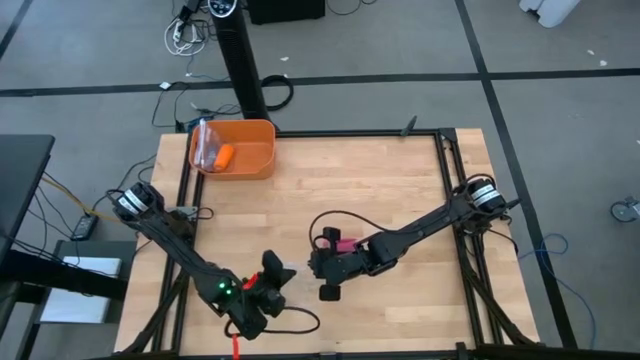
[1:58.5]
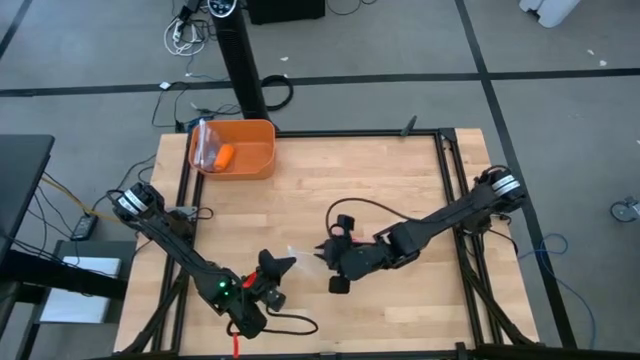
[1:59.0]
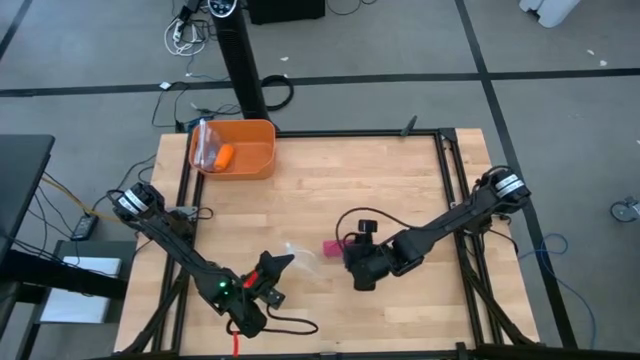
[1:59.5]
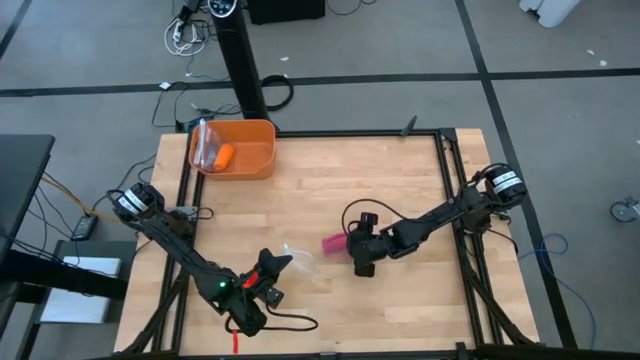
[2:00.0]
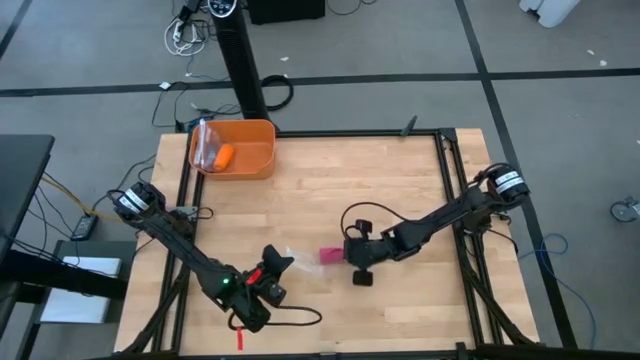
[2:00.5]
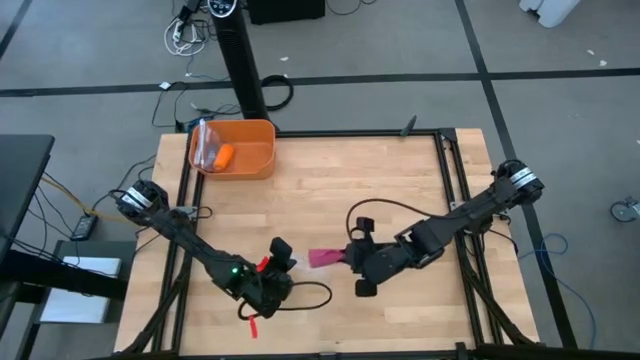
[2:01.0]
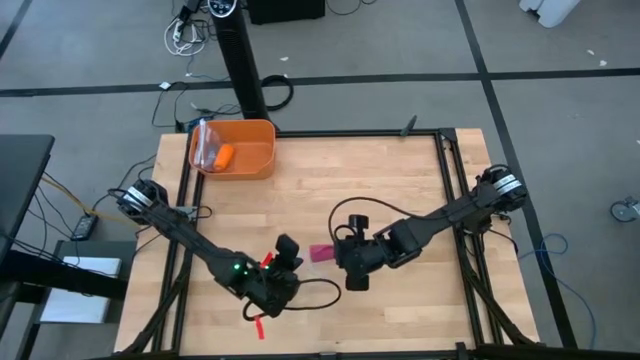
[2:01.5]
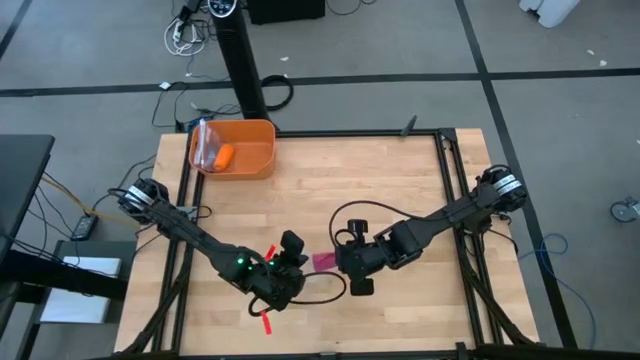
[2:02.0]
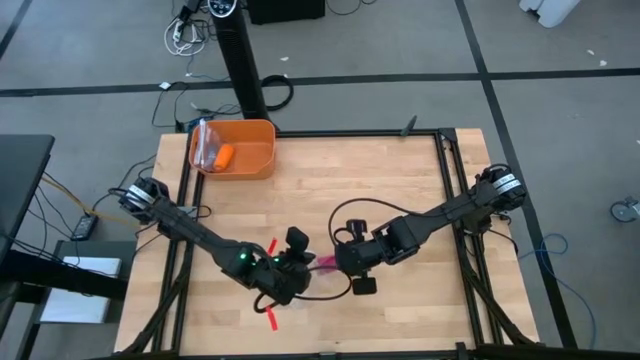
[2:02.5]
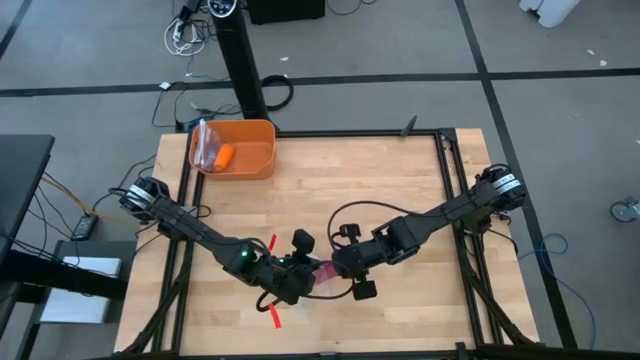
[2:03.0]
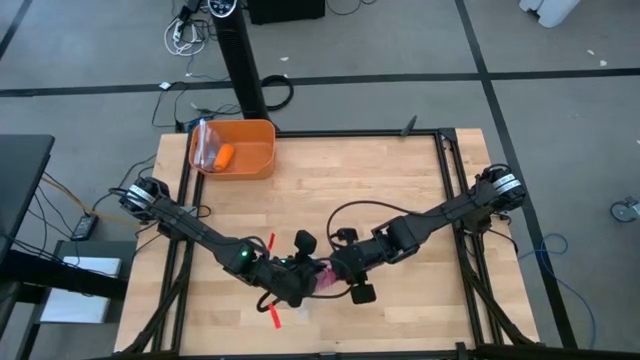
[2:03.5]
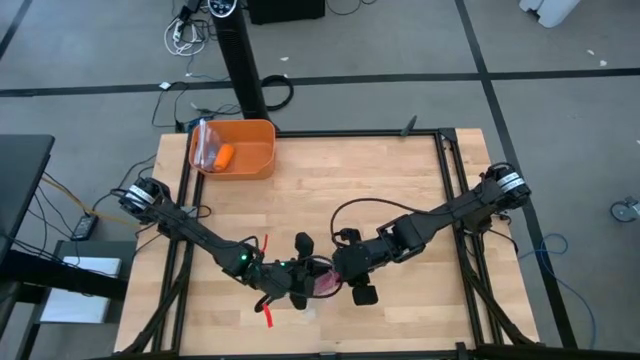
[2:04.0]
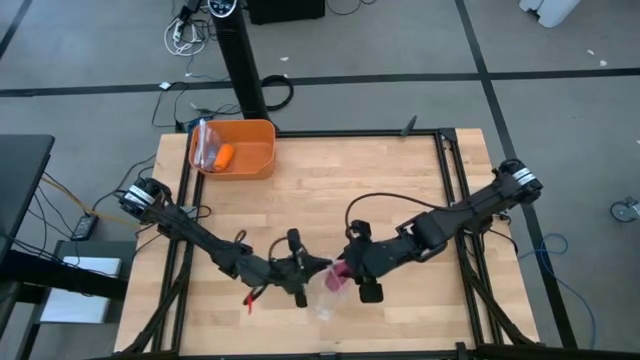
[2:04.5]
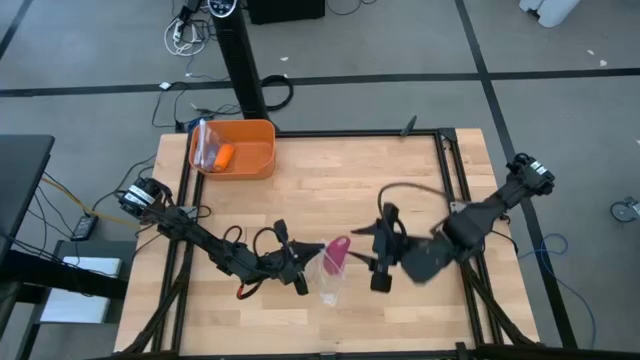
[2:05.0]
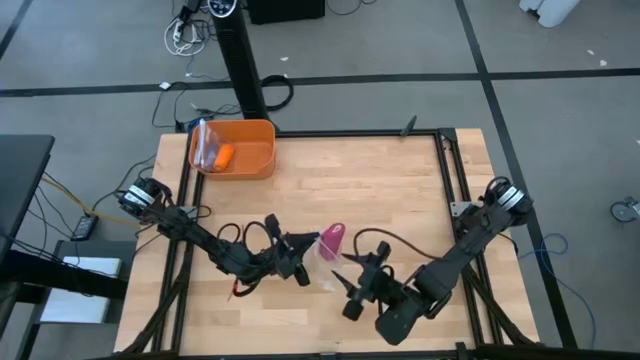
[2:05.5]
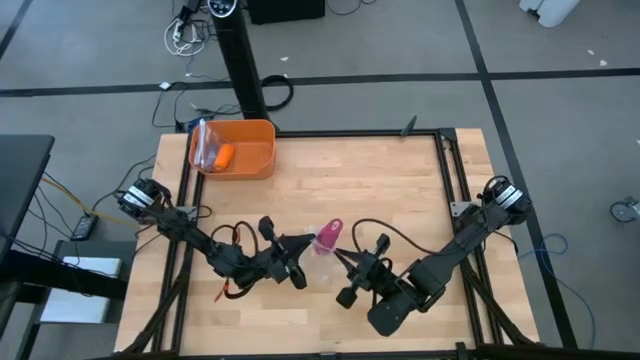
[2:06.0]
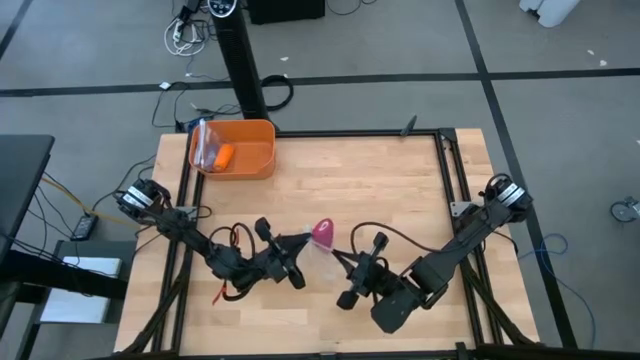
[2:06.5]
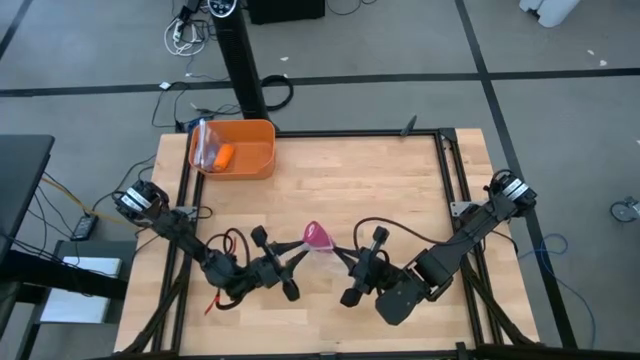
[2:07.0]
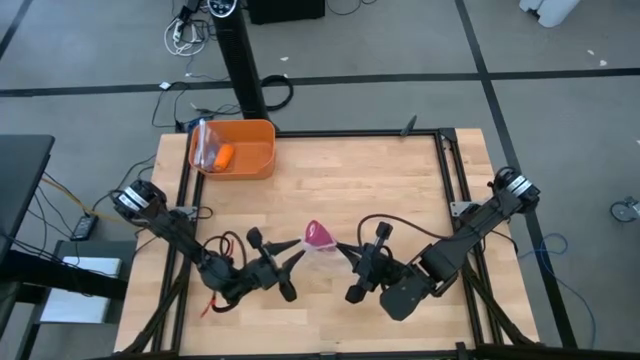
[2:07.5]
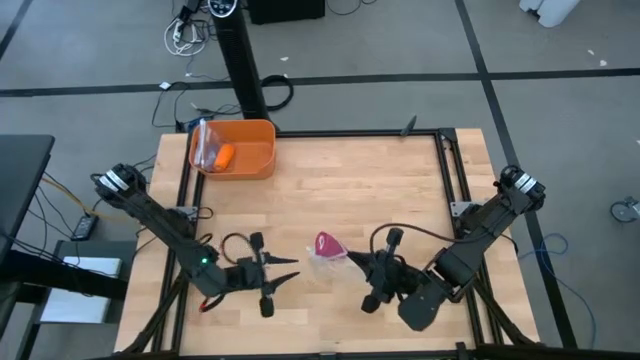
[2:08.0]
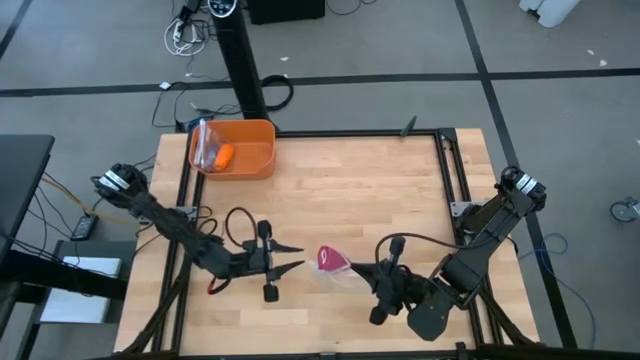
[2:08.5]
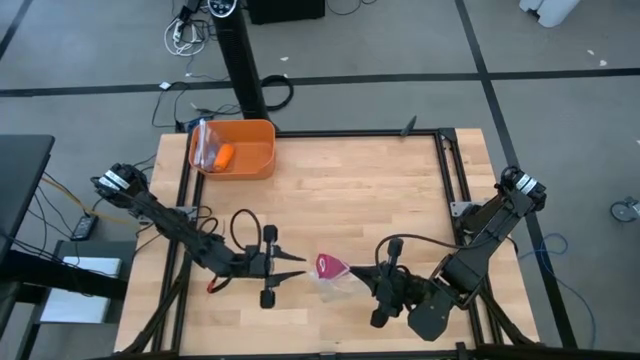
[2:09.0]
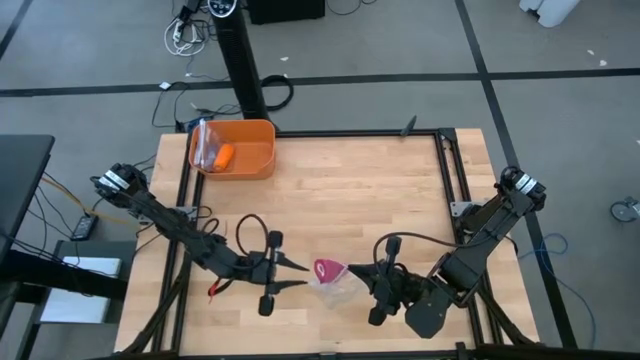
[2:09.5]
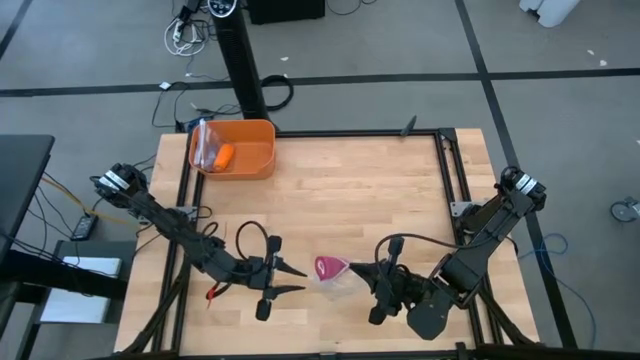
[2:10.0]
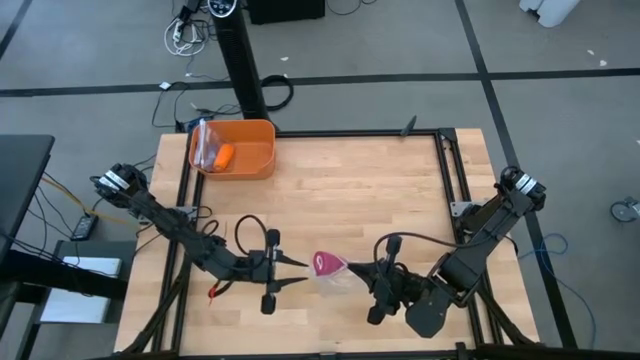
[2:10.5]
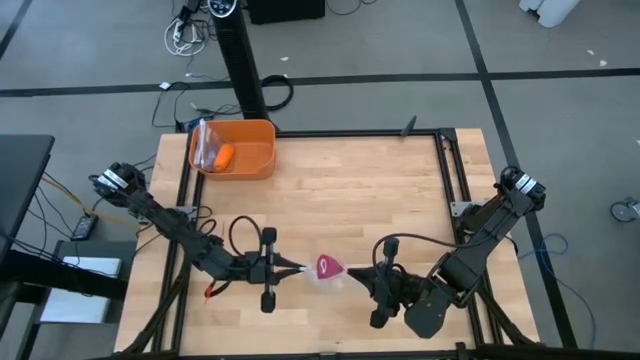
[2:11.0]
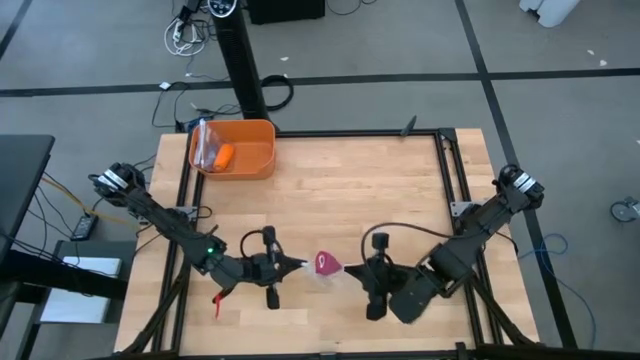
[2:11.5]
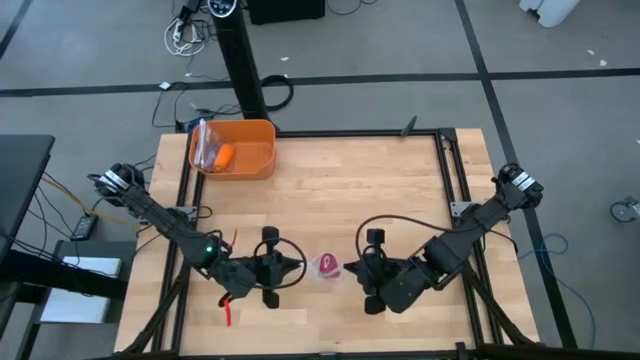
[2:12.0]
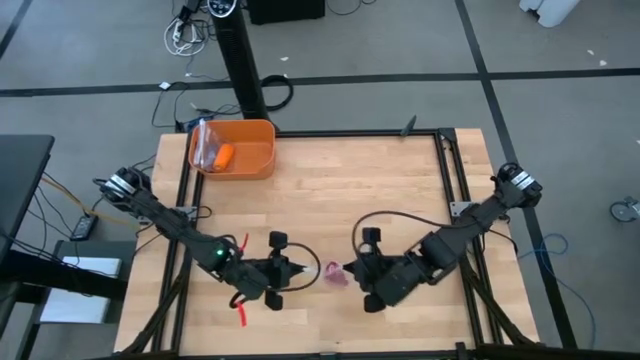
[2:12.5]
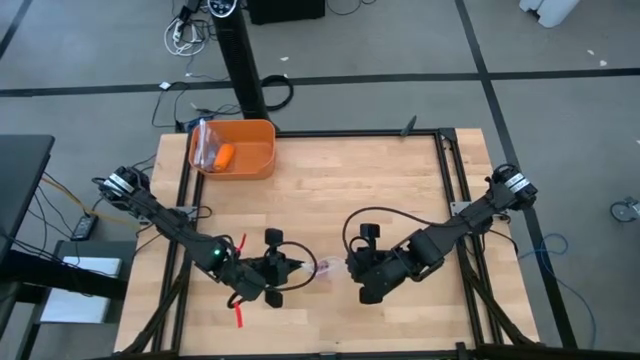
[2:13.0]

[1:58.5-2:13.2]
Task: Roll bandage
Put the pink bandage into the transparent zip bag

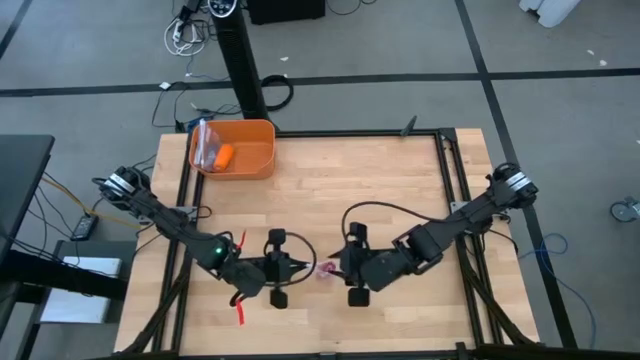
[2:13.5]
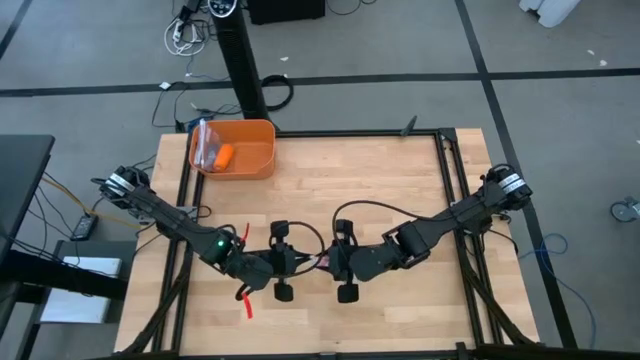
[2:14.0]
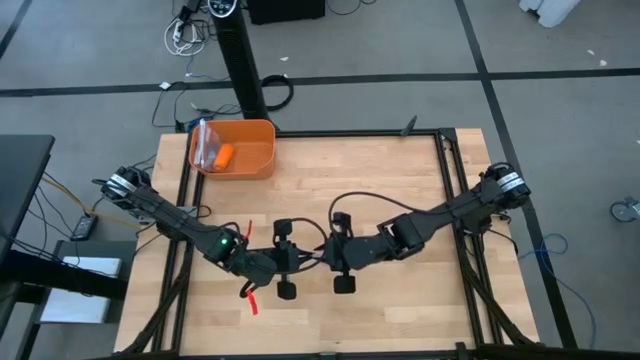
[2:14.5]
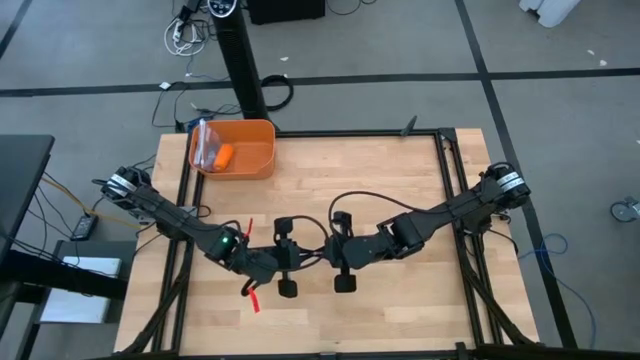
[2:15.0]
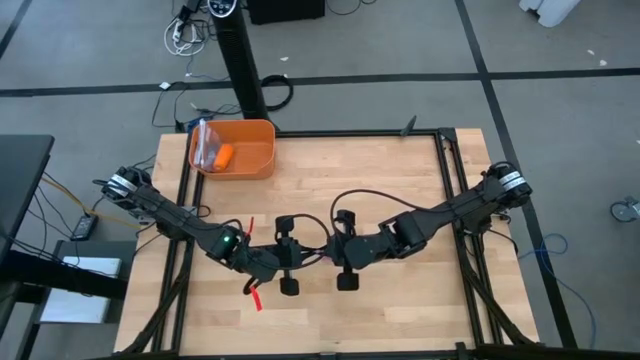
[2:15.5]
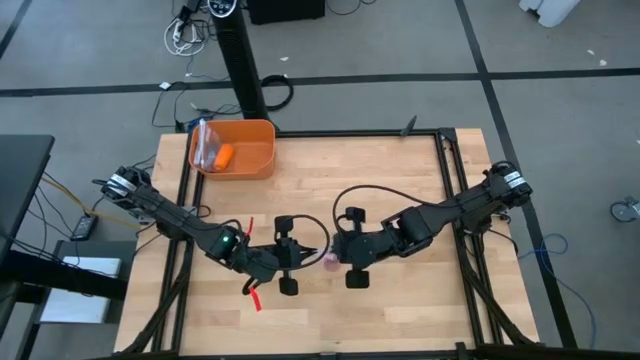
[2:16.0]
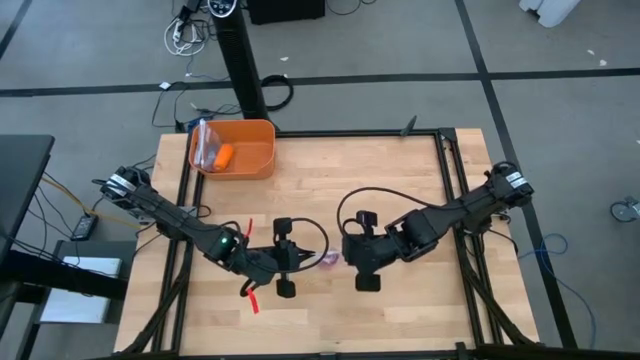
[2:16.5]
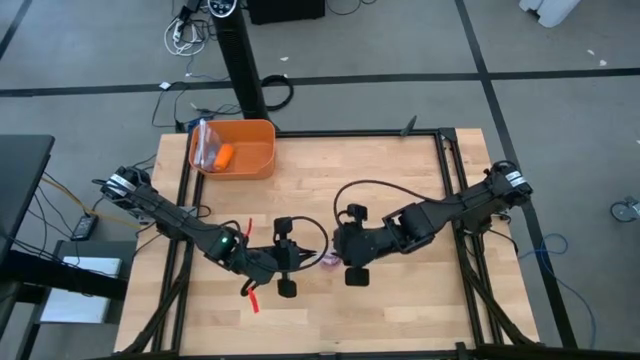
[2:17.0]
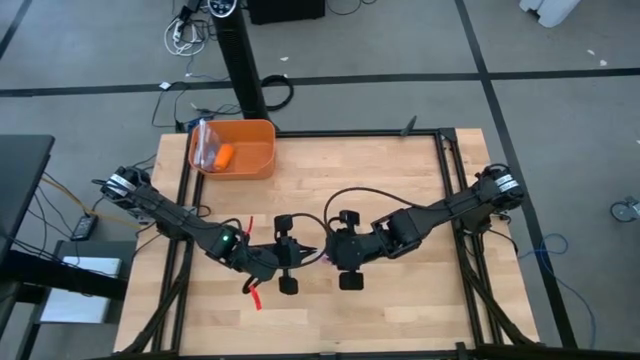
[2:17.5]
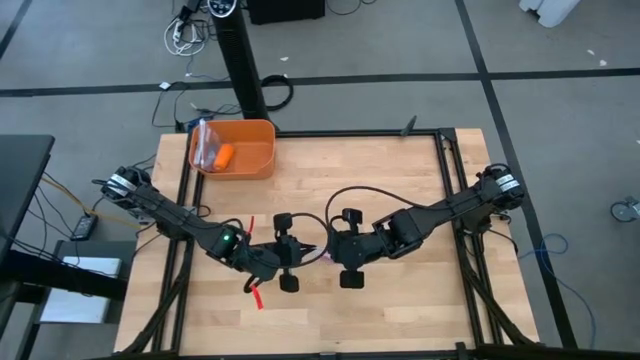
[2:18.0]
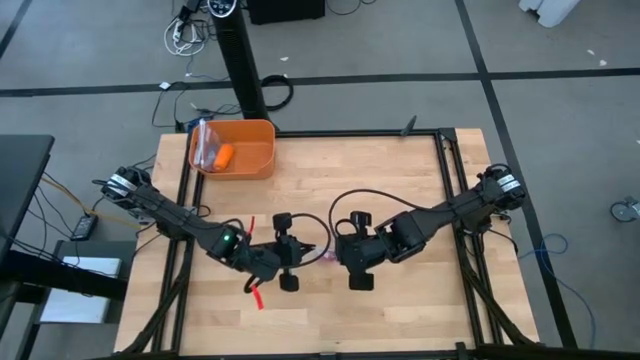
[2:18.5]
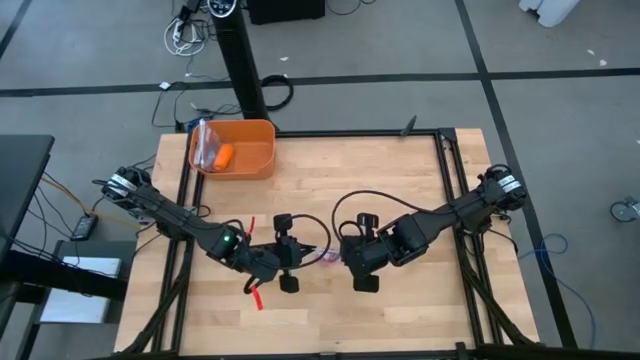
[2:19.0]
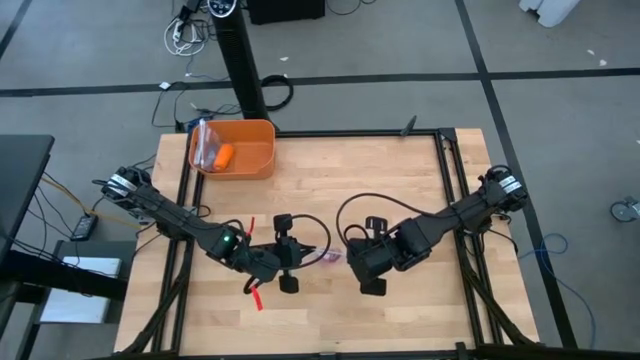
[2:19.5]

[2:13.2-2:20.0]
Close the transparent zip bag
